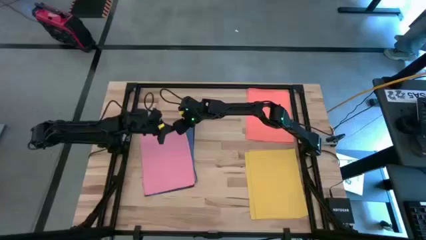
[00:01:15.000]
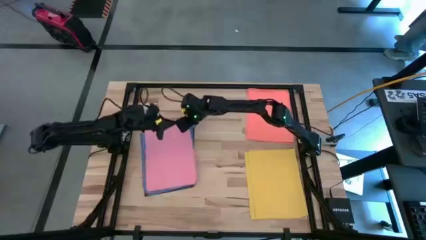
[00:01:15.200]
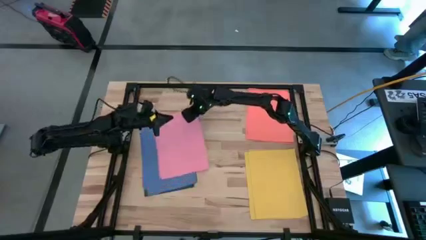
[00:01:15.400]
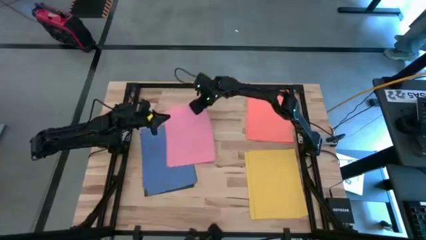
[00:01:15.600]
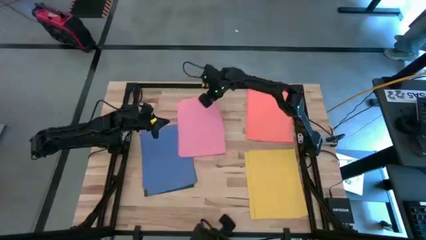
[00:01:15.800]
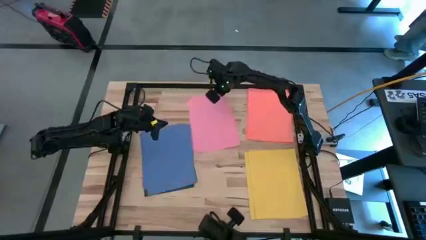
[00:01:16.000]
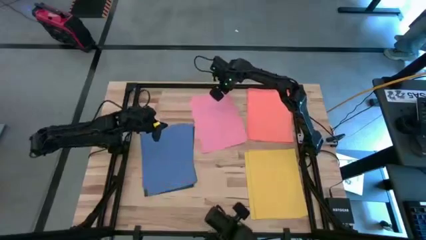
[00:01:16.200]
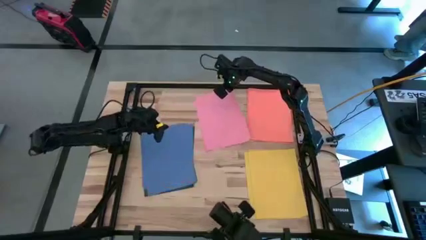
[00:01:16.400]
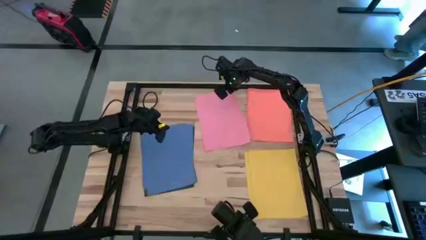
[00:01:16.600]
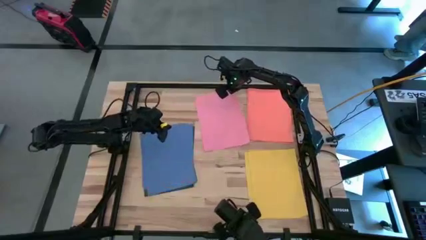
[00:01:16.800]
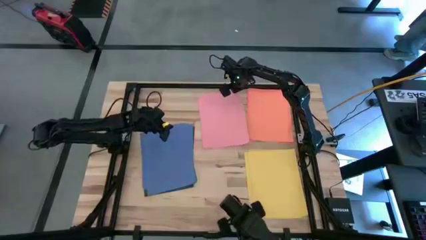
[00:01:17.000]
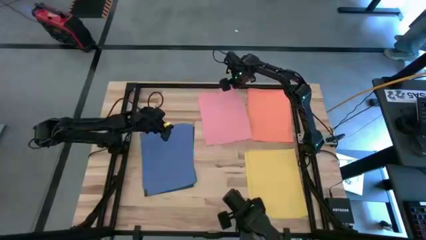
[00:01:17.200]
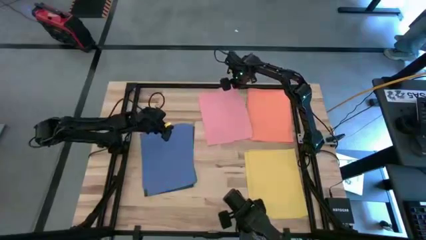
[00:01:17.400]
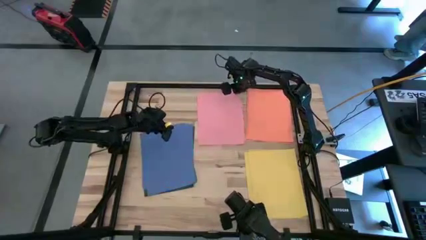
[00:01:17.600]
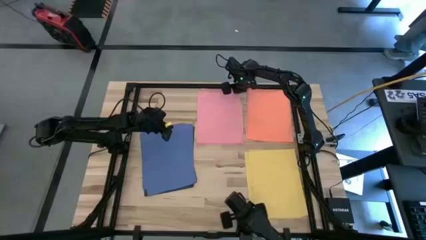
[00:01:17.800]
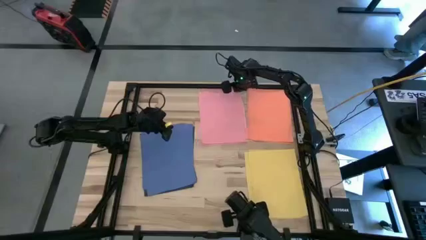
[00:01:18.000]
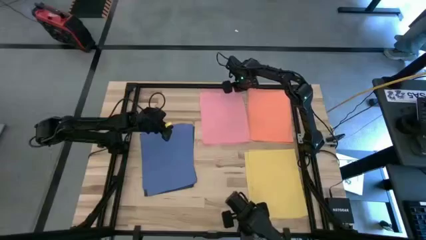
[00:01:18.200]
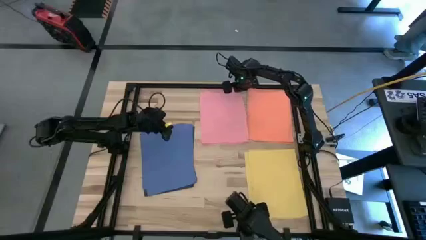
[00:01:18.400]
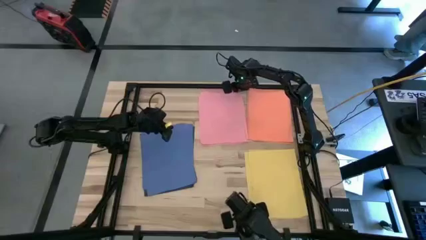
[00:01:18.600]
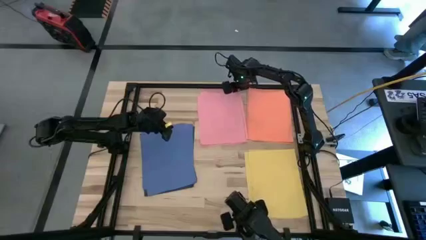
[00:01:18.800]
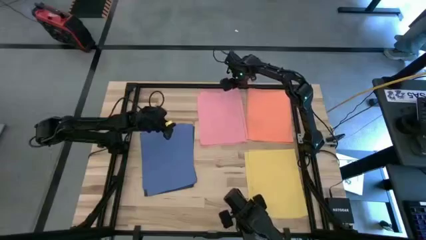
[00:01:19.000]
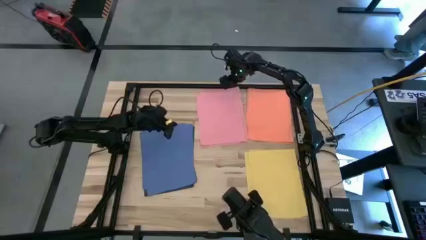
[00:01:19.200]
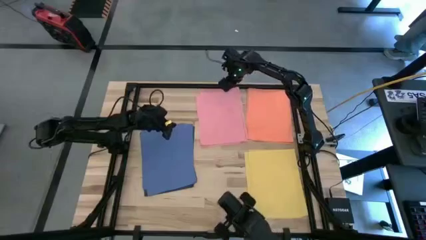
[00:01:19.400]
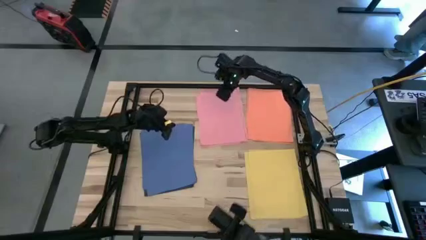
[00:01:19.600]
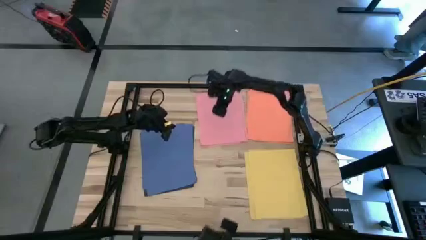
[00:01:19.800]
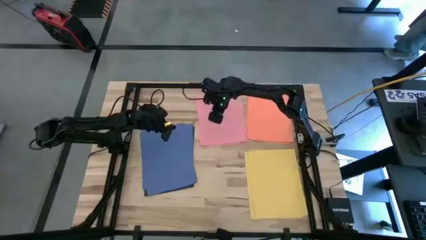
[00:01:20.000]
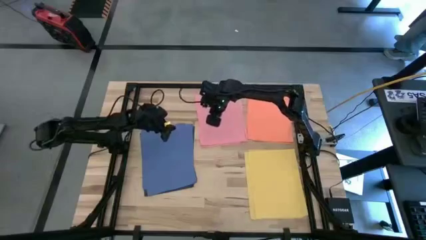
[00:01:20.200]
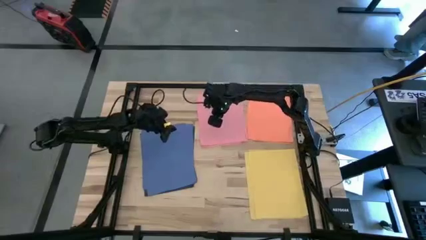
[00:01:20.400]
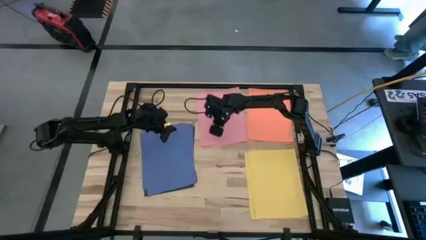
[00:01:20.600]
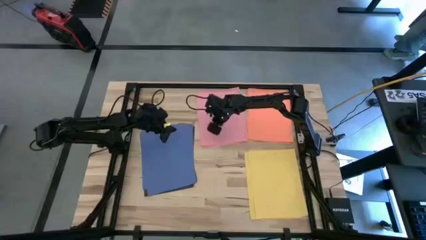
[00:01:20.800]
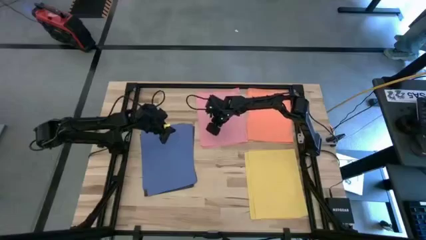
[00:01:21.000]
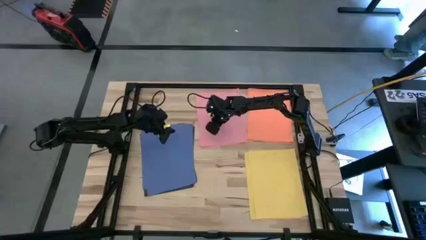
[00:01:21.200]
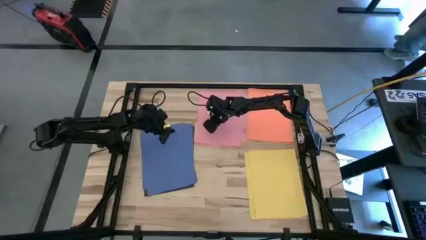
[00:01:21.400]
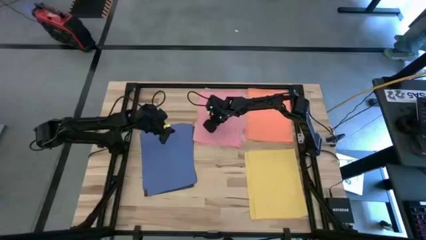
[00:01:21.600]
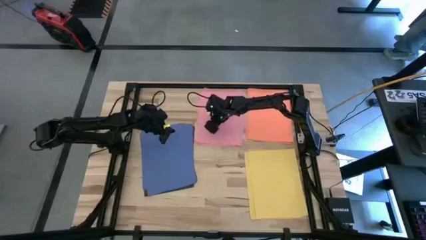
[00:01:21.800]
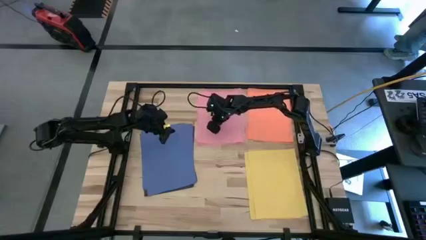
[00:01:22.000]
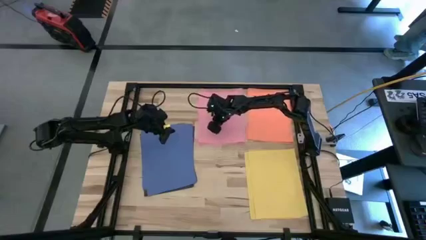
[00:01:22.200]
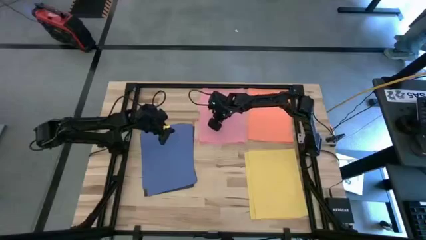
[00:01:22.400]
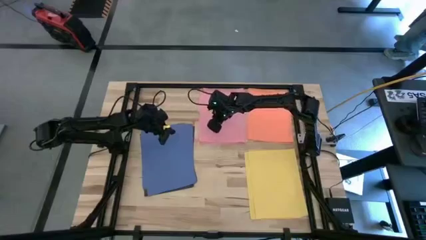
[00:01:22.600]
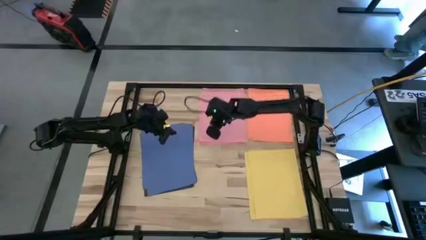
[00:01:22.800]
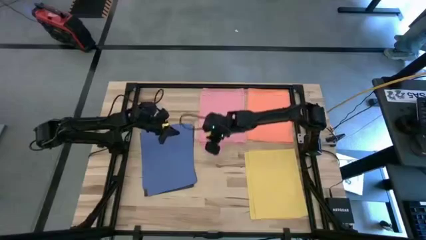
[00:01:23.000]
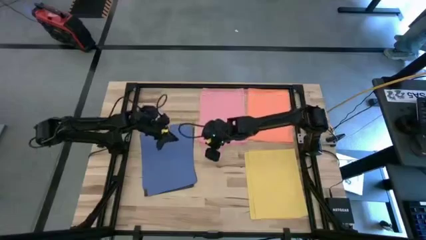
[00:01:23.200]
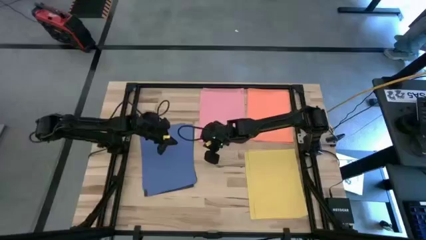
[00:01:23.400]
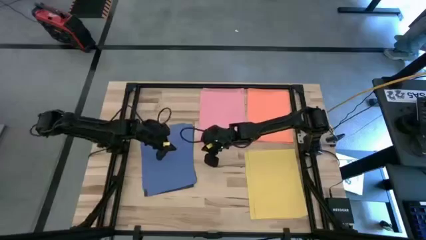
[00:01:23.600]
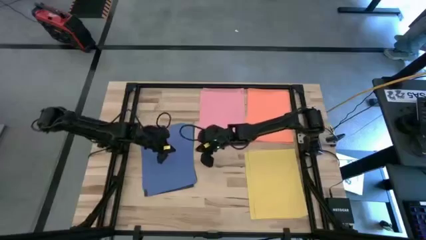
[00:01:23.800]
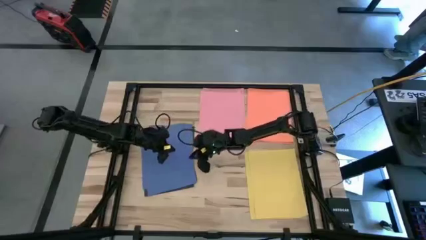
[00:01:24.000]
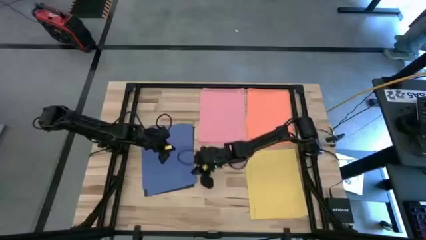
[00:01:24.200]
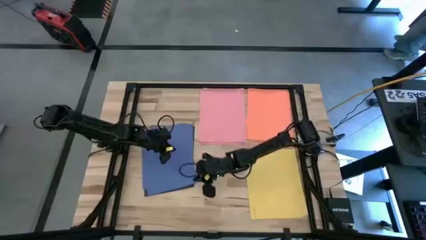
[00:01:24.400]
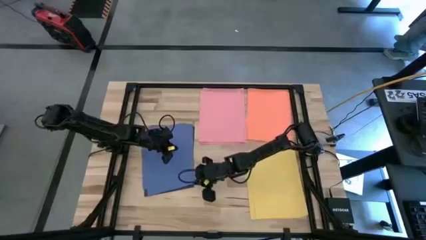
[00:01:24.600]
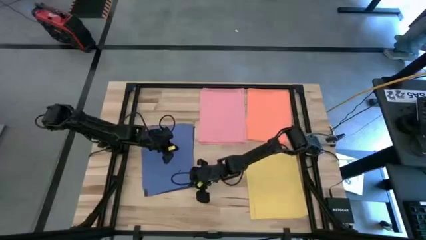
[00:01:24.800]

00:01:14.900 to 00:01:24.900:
Task: Organize paper
Put all of the pink paper at the upper middle of the table

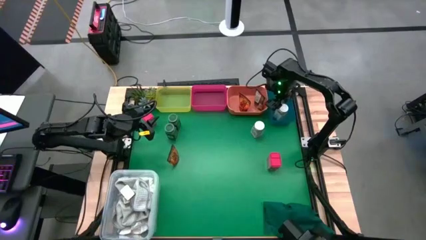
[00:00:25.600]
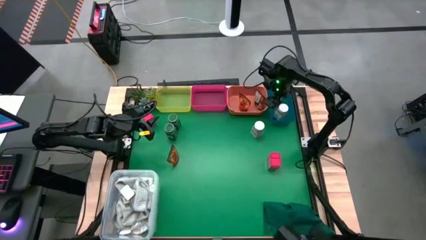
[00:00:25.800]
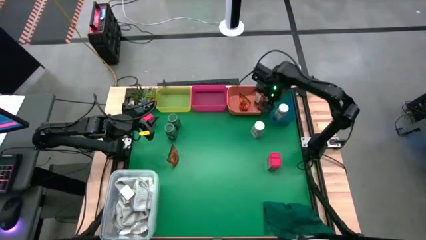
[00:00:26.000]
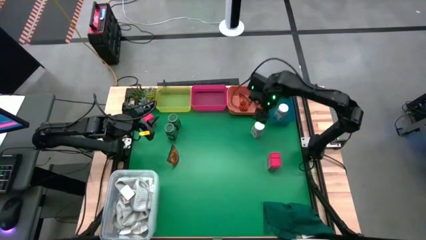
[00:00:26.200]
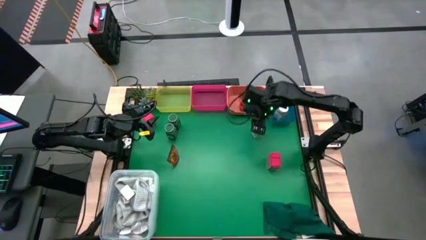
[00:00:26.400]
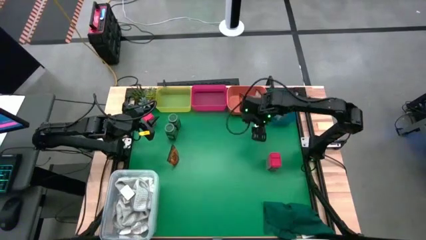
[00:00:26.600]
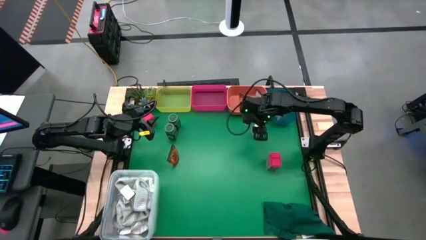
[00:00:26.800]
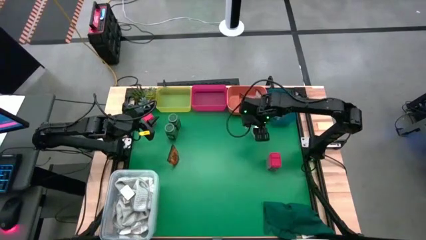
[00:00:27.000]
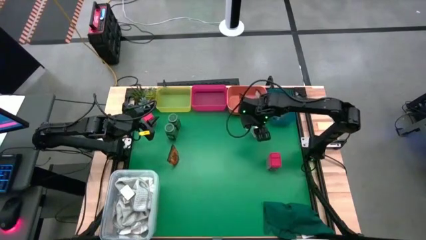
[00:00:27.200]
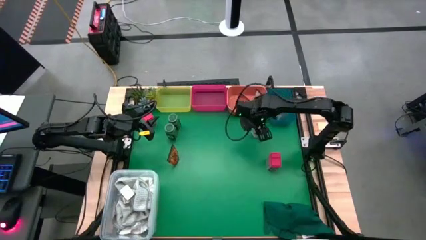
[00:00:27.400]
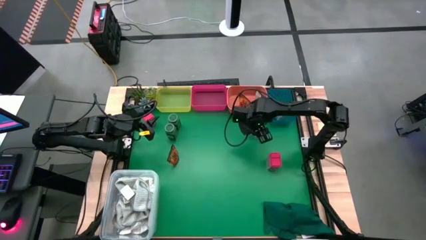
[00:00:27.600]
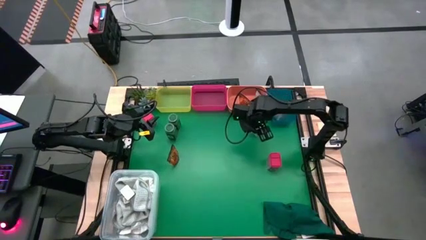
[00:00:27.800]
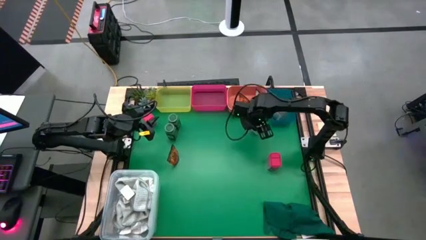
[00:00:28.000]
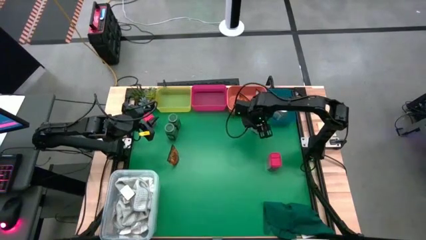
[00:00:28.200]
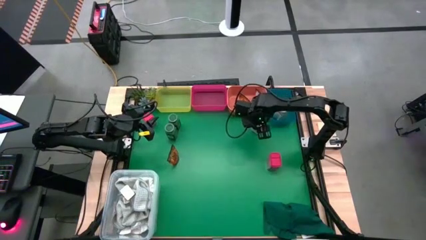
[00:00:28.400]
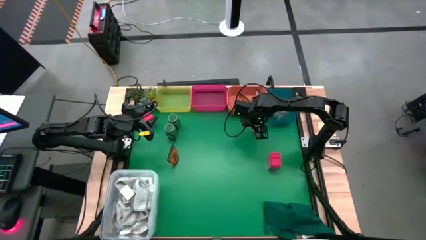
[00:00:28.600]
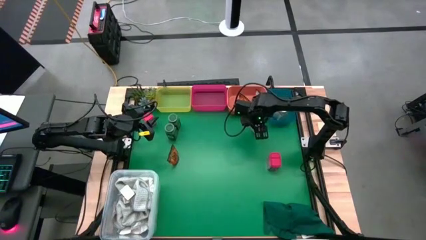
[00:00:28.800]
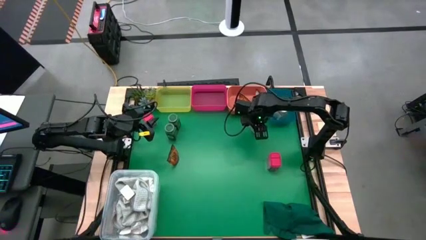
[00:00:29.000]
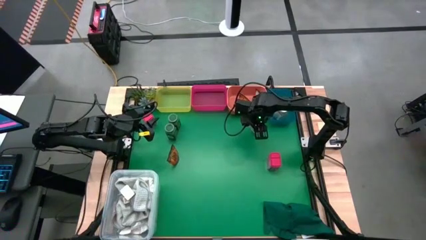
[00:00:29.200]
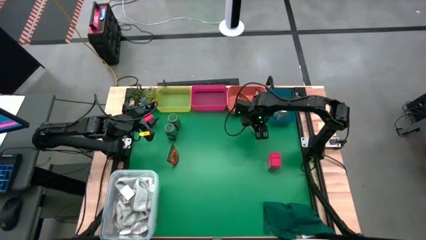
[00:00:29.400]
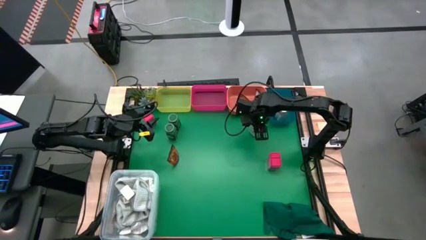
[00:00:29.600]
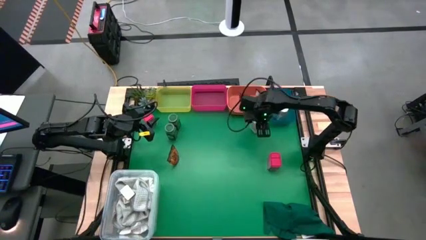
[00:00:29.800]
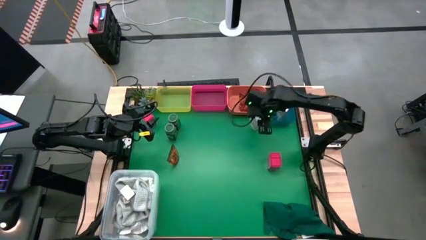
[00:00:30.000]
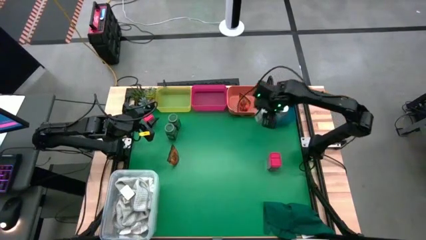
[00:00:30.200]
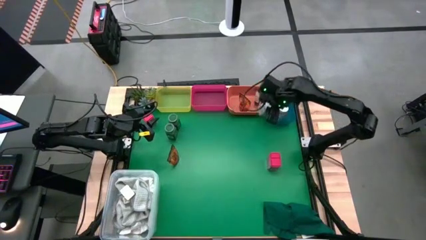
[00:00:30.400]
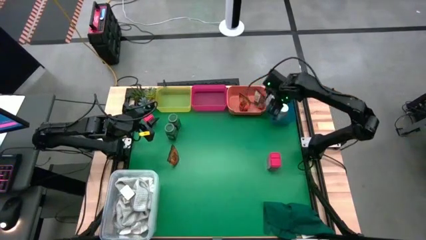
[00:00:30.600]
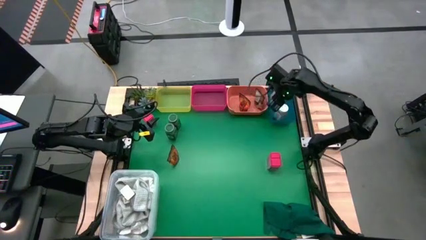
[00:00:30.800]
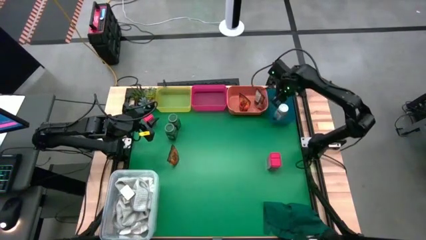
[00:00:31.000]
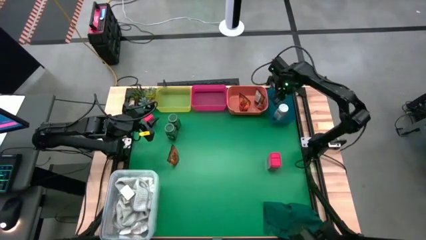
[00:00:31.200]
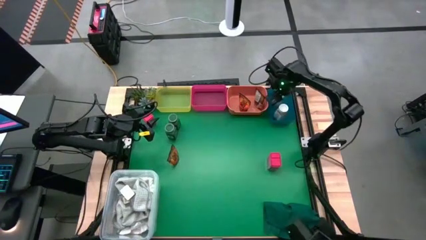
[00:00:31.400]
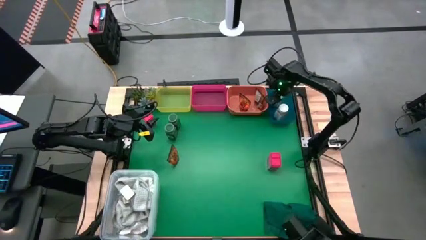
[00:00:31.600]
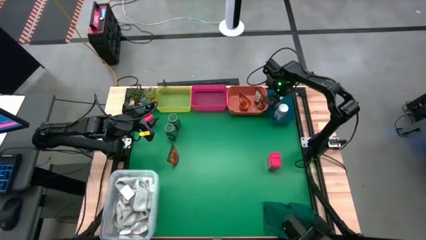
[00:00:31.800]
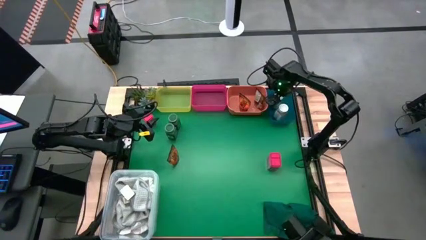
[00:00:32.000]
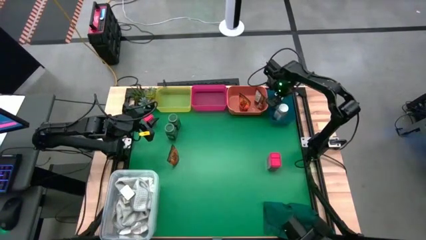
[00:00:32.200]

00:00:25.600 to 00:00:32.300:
Task: Sort spices by type
Put the white seasoning into the blue bin
